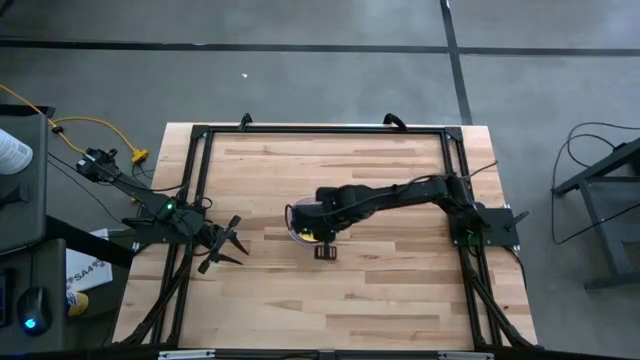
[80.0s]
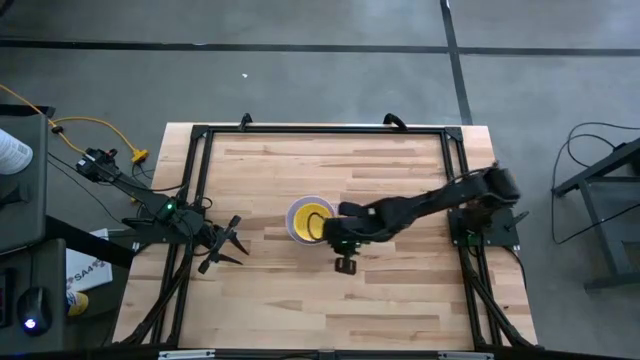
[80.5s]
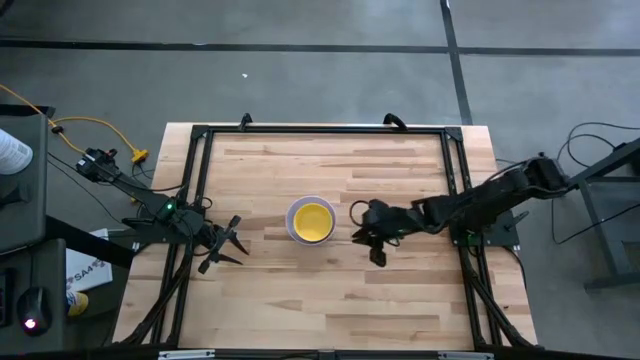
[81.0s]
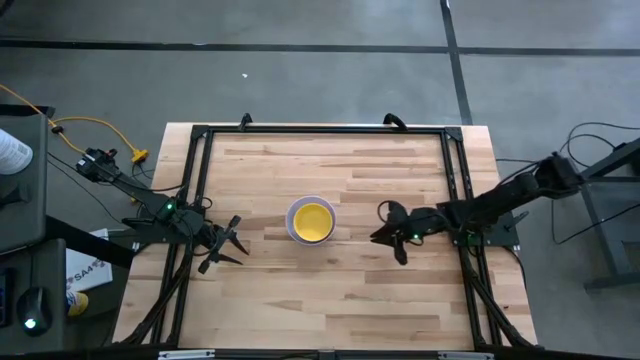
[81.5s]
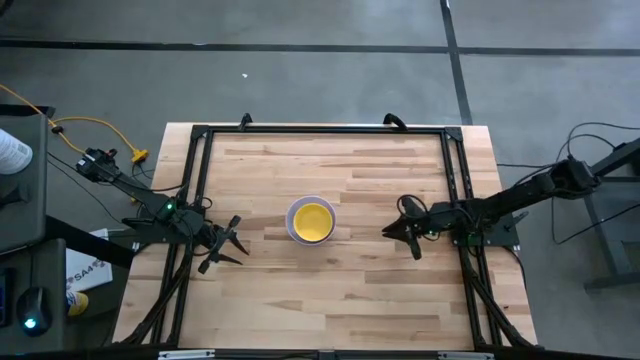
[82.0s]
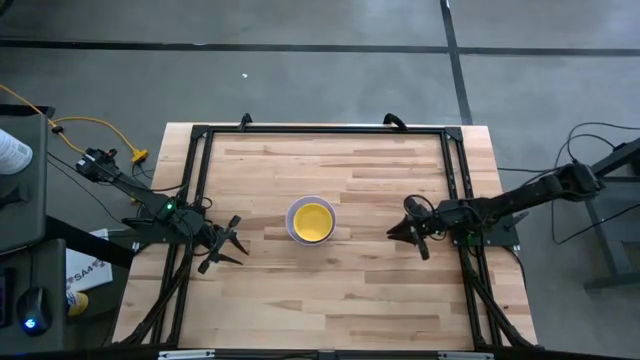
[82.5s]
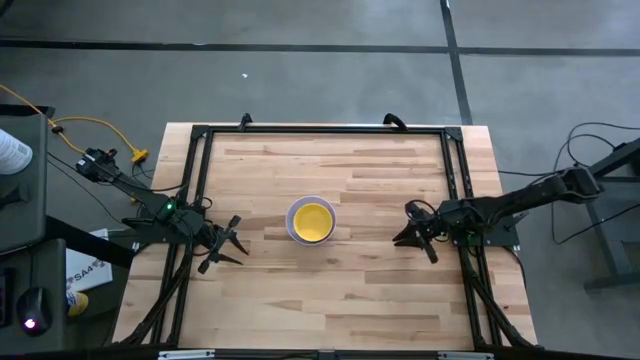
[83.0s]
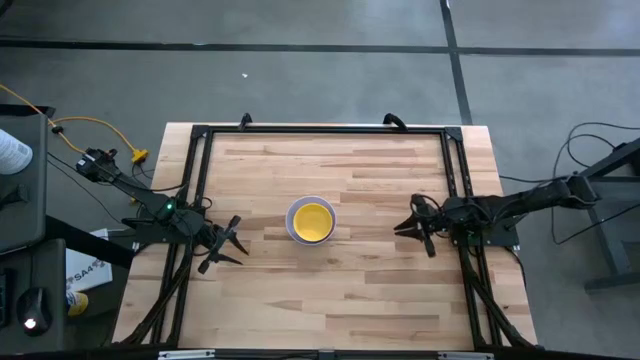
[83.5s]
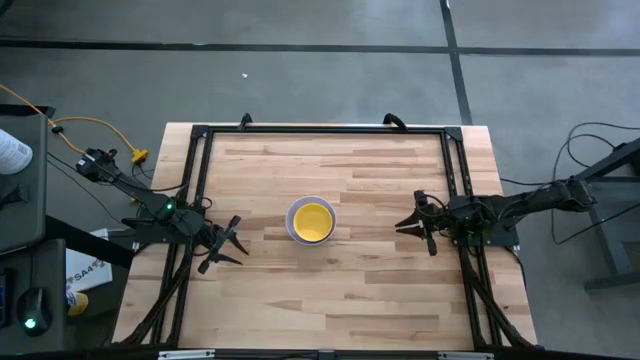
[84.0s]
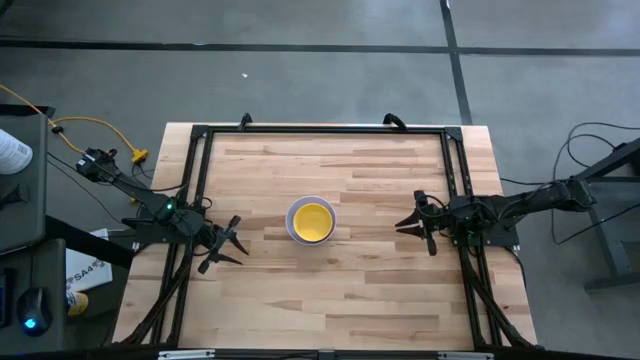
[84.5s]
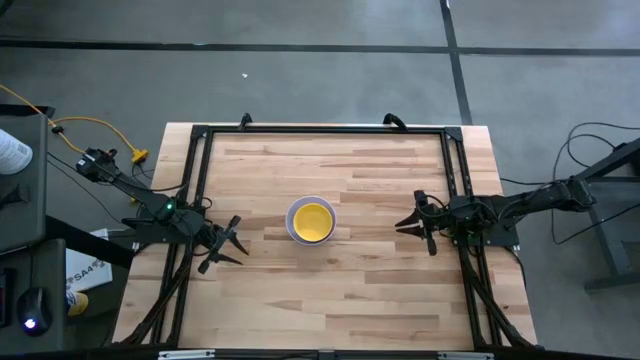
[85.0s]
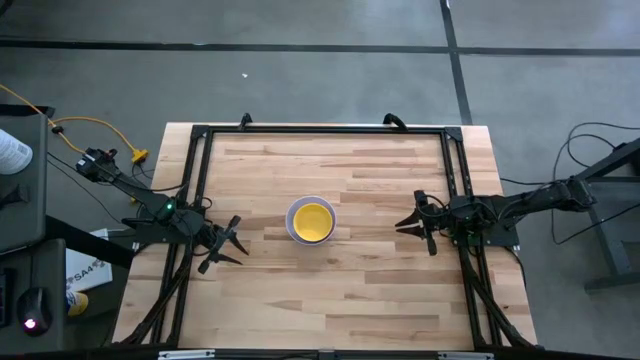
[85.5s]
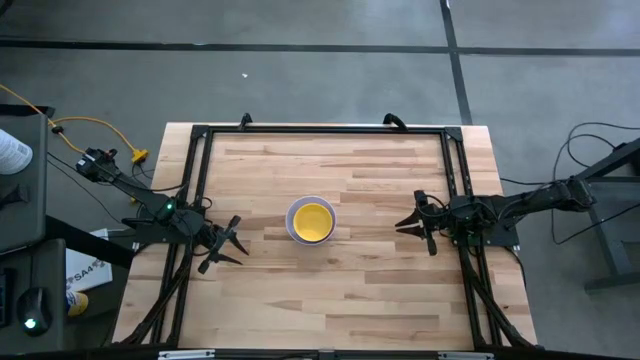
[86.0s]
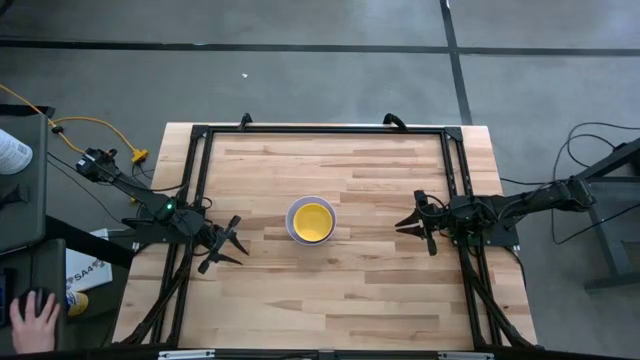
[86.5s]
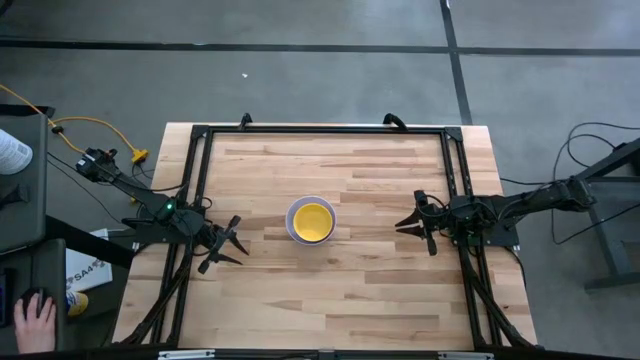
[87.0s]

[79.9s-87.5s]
Return to Home Position

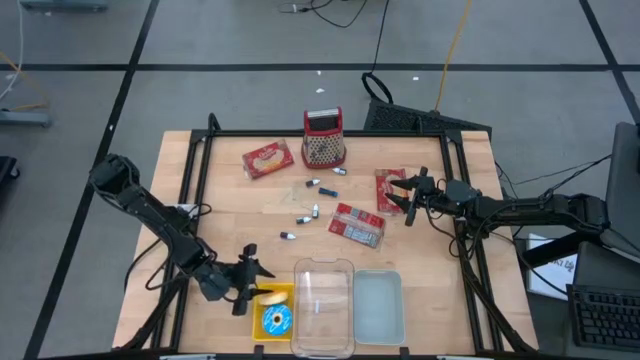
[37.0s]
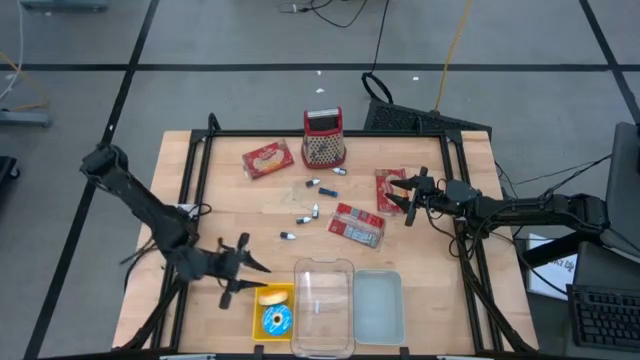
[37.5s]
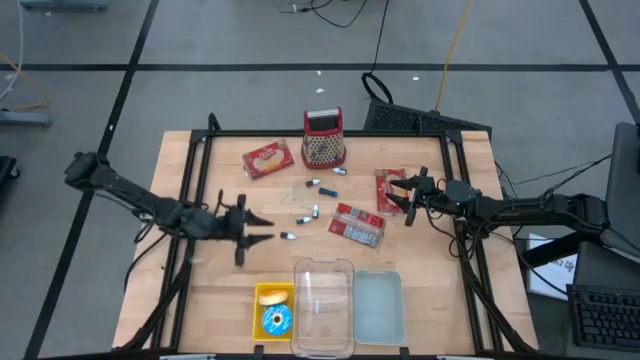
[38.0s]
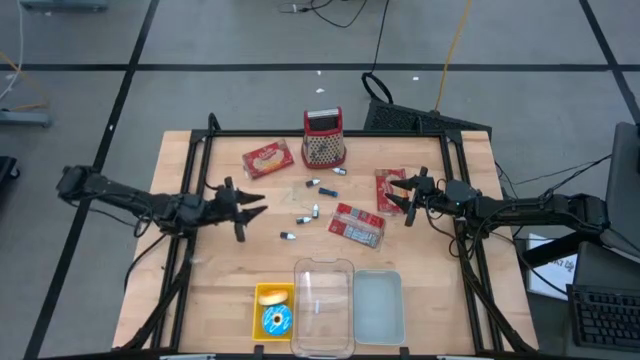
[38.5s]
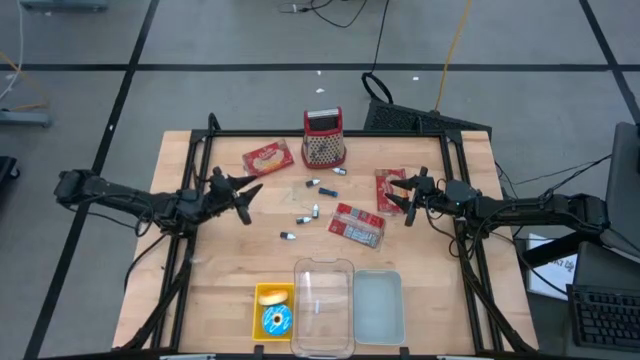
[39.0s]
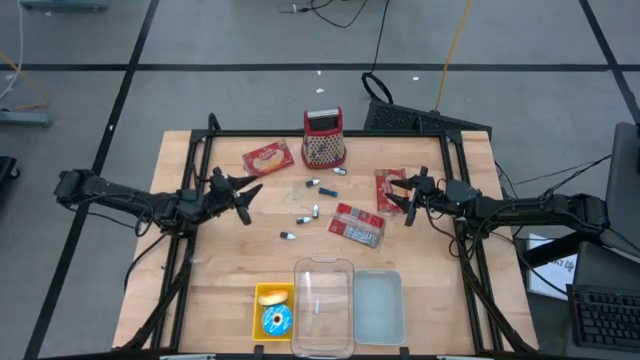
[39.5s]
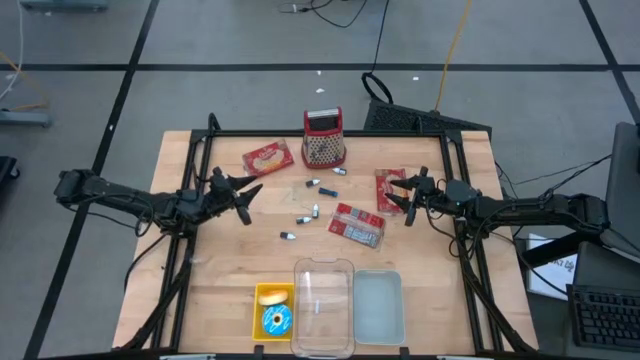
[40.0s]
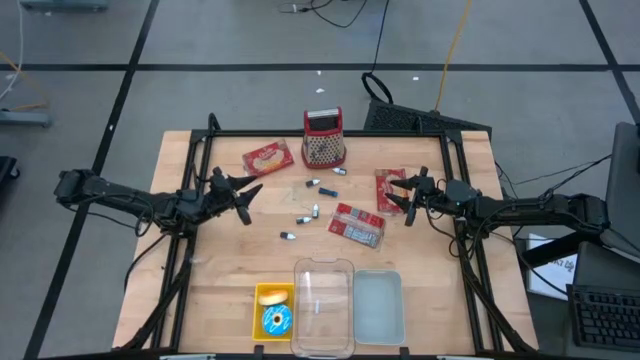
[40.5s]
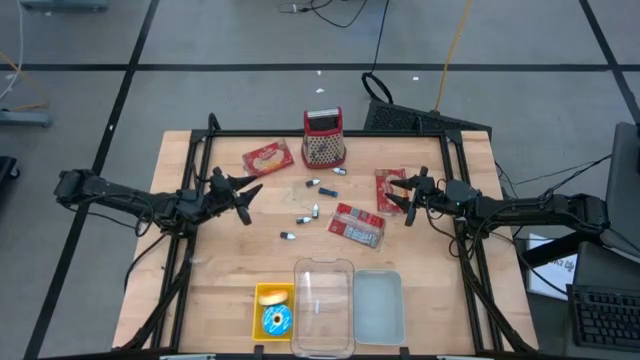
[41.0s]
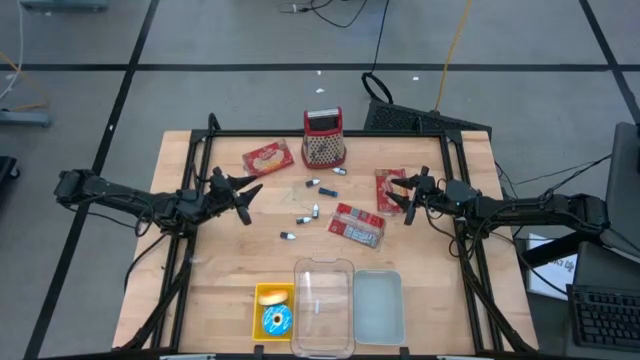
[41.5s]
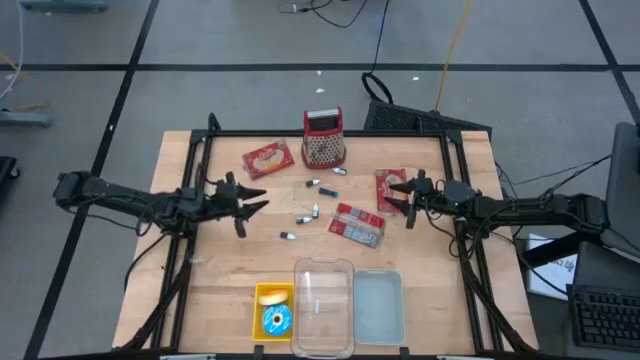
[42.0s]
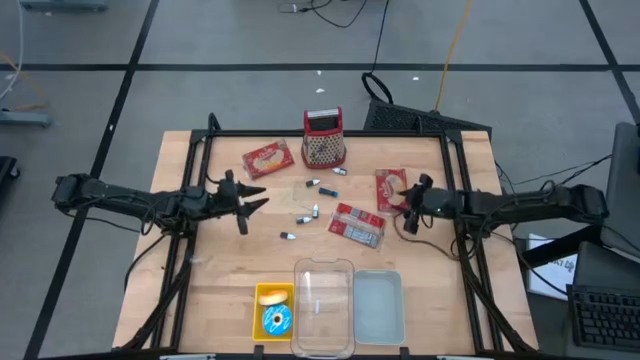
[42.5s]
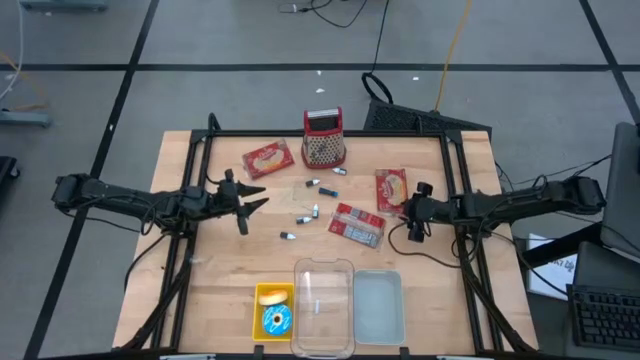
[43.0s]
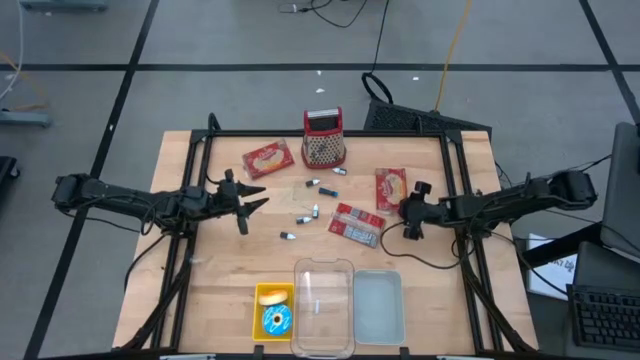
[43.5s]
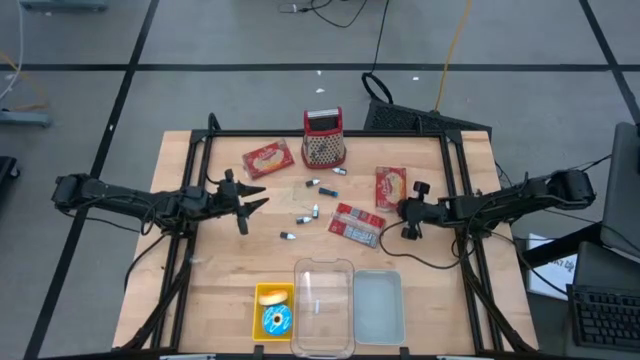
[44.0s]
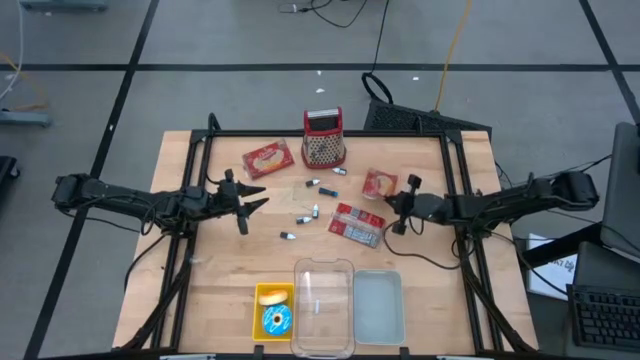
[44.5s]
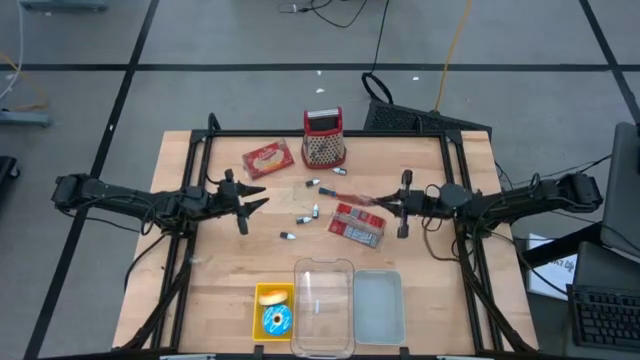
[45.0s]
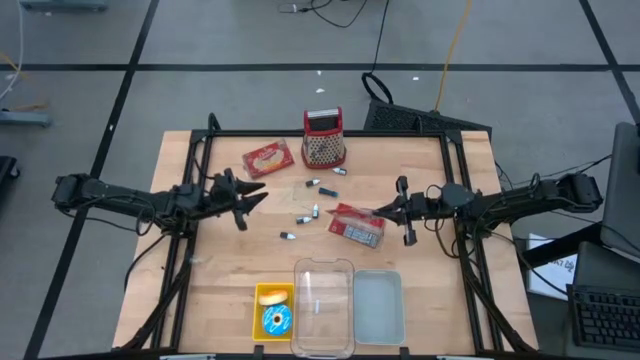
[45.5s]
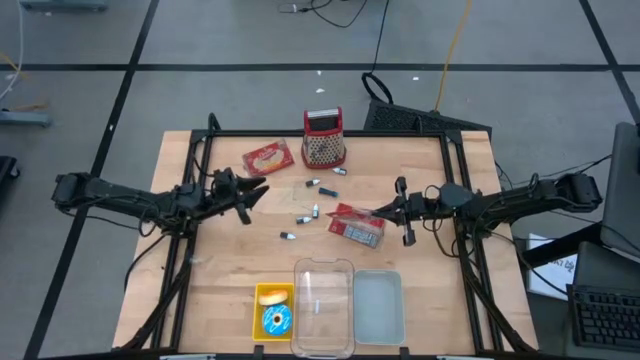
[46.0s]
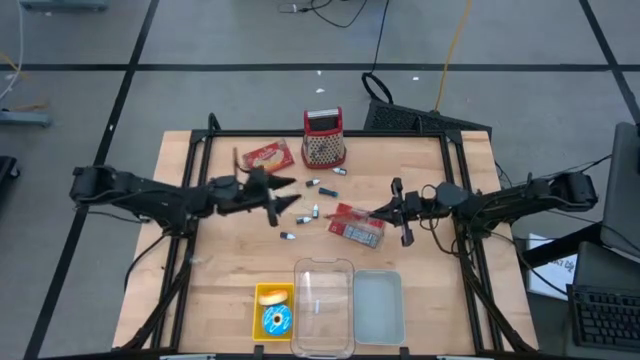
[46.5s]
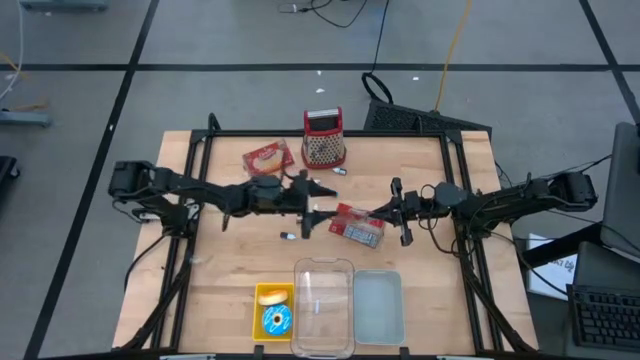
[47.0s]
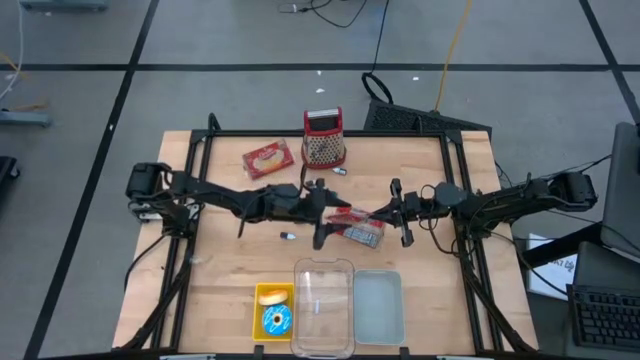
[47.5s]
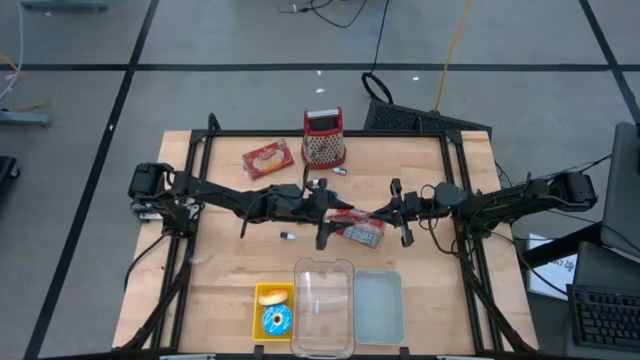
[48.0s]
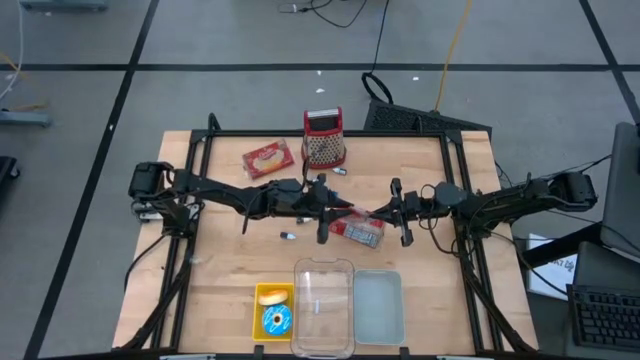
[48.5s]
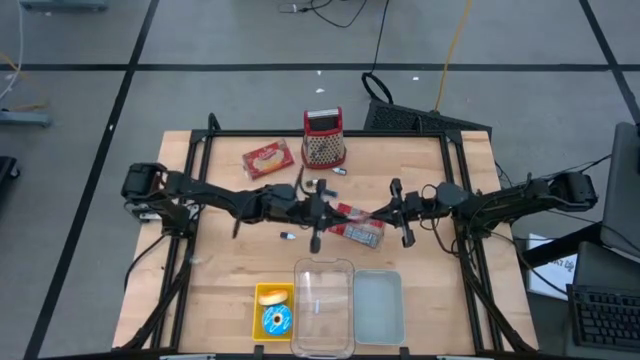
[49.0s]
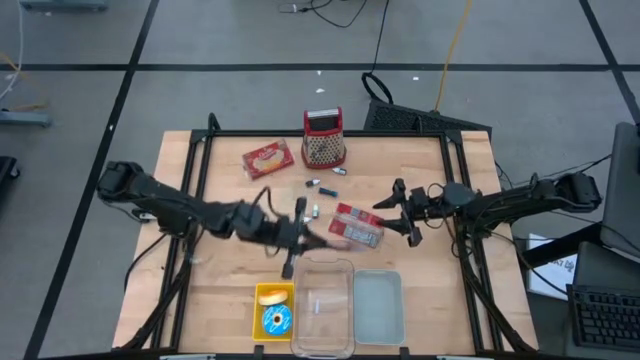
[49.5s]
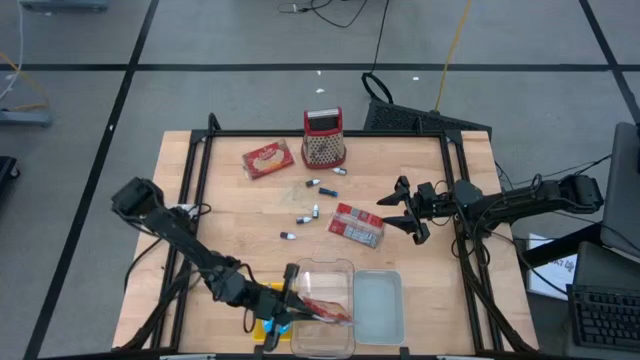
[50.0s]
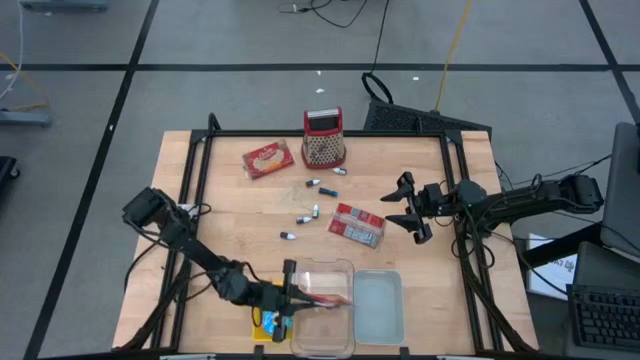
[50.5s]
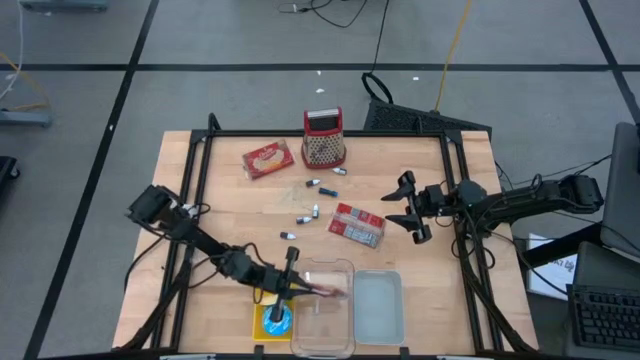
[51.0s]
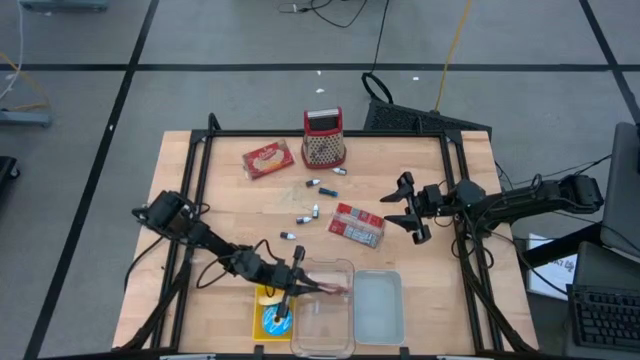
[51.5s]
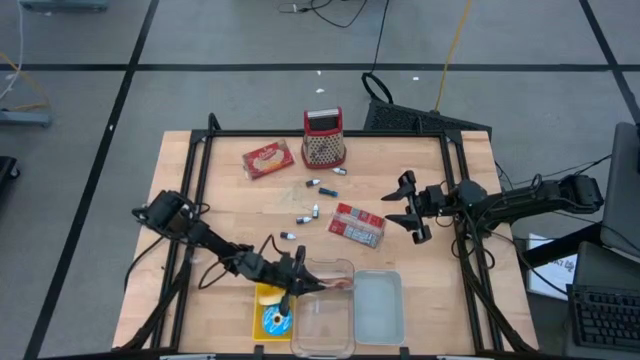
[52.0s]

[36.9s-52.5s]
Put the middle popcorn bag into the transparent bin
